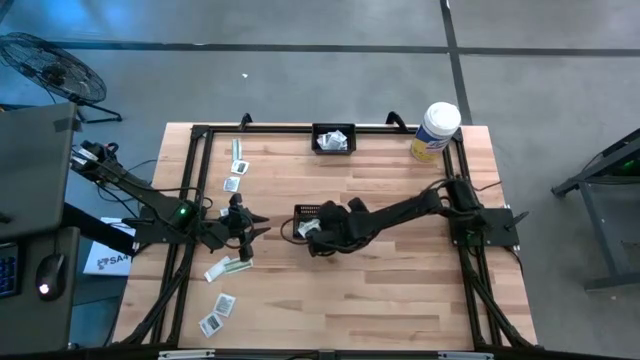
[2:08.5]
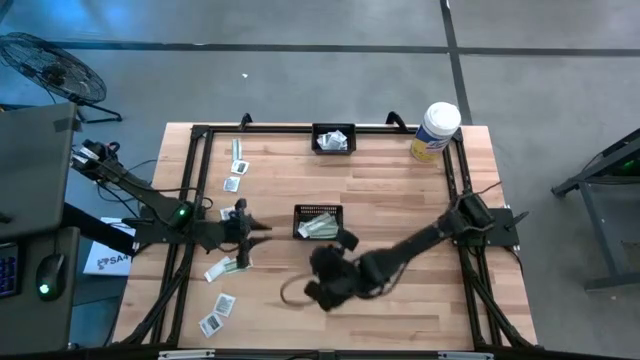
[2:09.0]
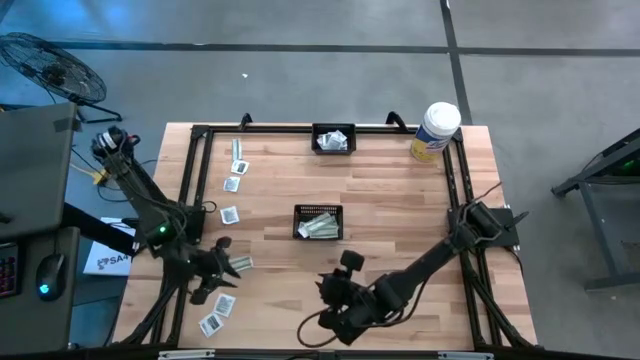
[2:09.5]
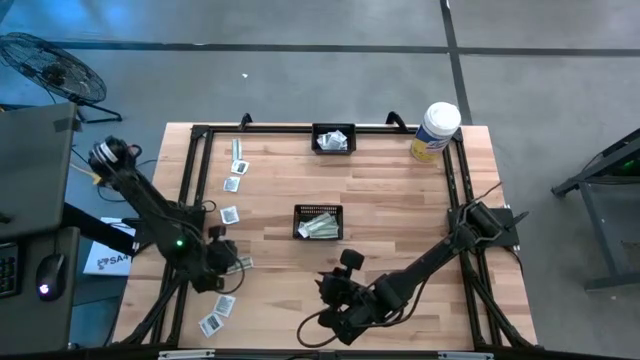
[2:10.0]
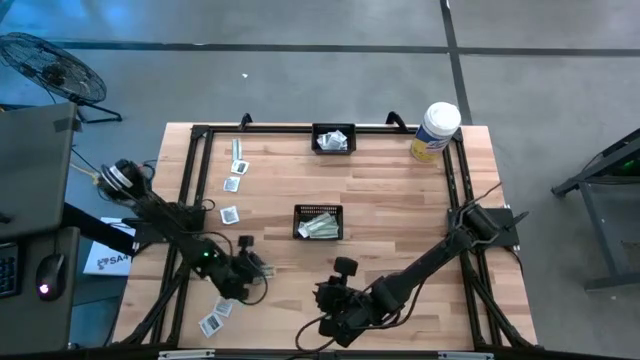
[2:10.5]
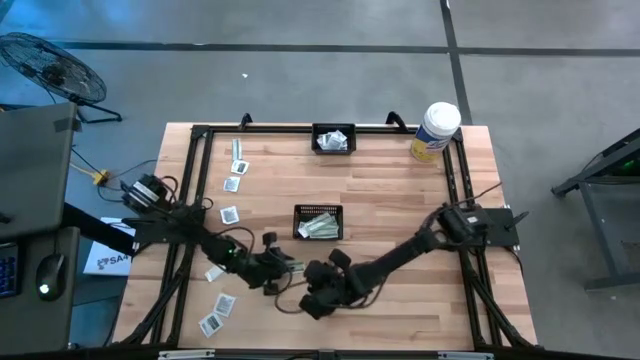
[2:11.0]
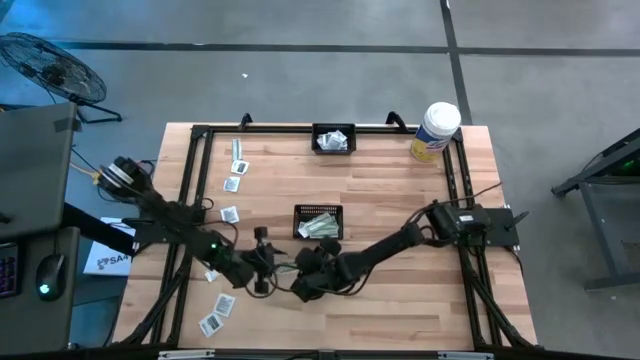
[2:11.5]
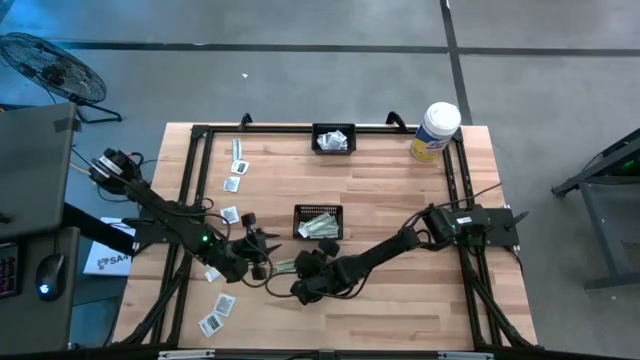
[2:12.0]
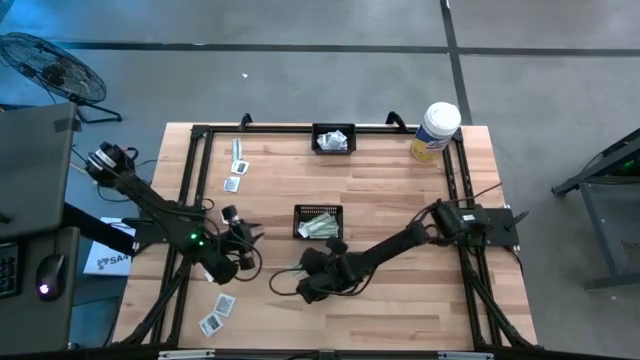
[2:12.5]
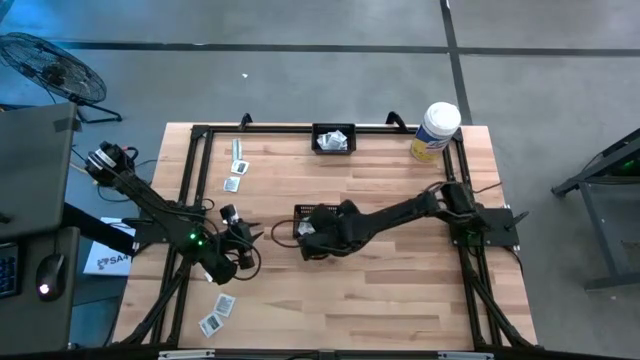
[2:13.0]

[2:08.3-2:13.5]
Task: Pick & Place First Aid Supplies
Put the bandage into the bottom black basket

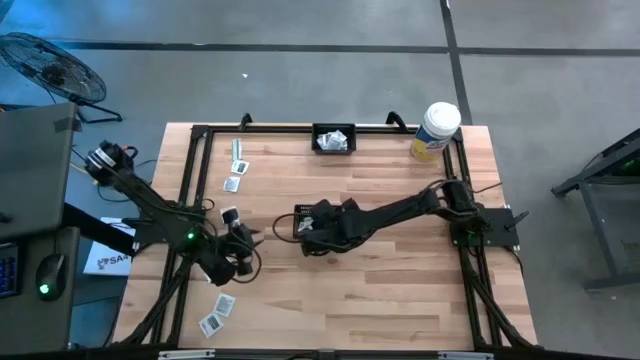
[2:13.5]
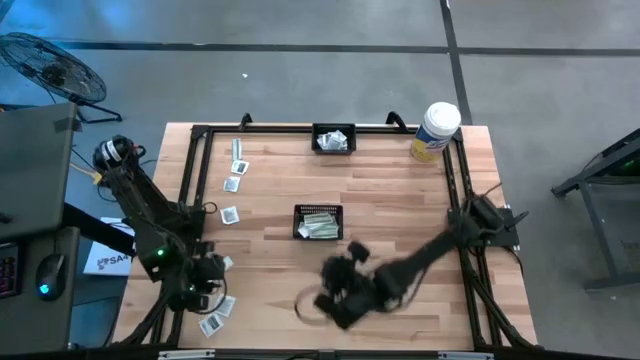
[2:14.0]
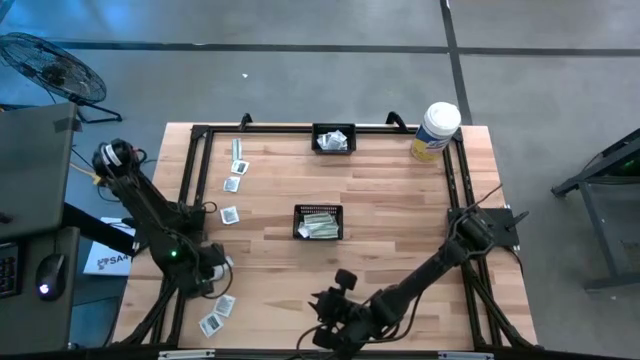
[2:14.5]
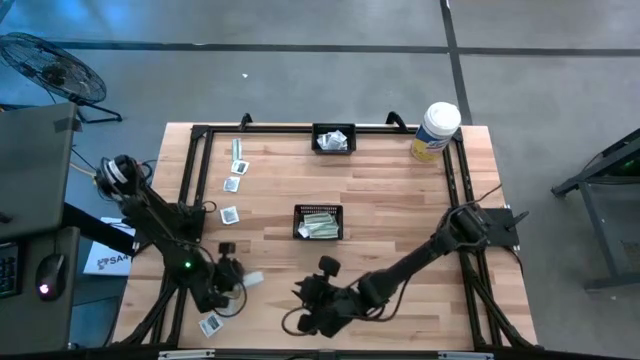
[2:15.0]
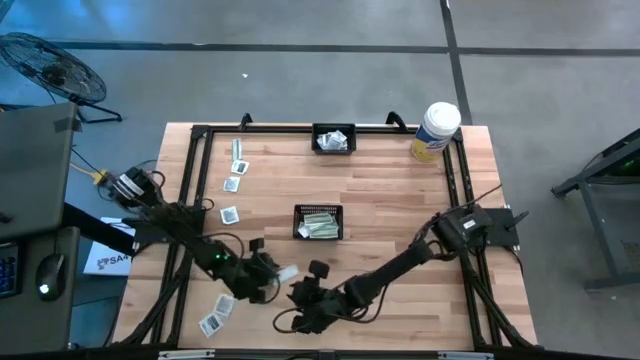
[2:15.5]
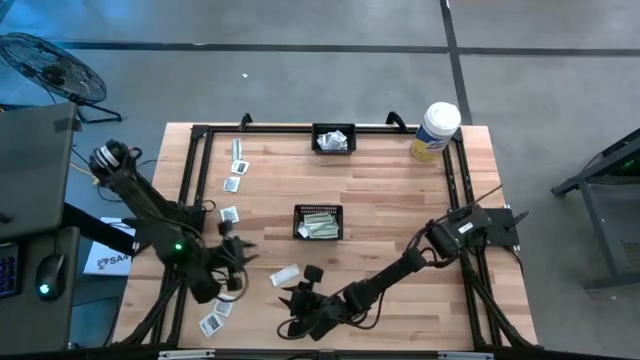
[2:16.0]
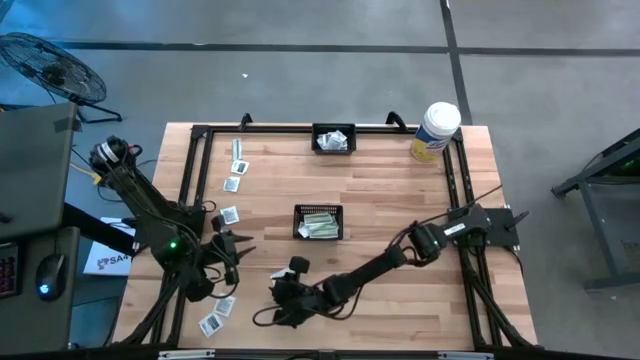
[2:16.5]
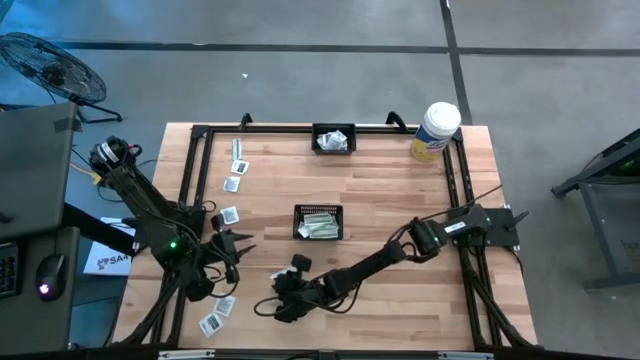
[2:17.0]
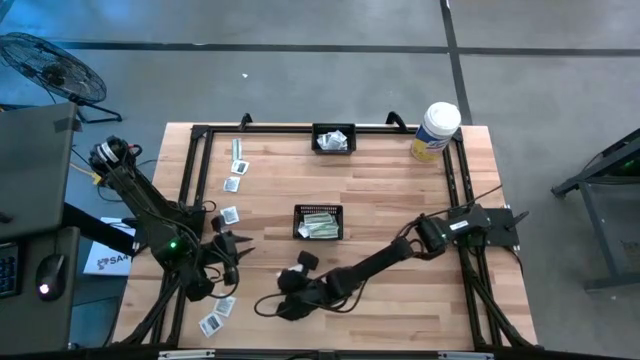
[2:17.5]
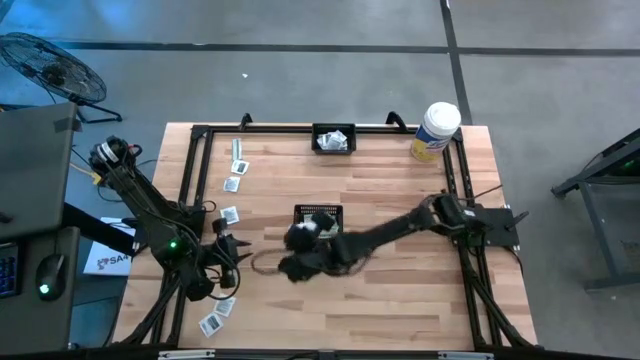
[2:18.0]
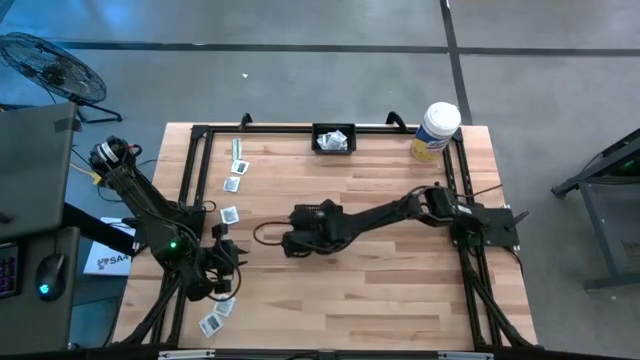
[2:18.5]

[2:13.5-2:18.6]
Put the bandage into the bottom black basket

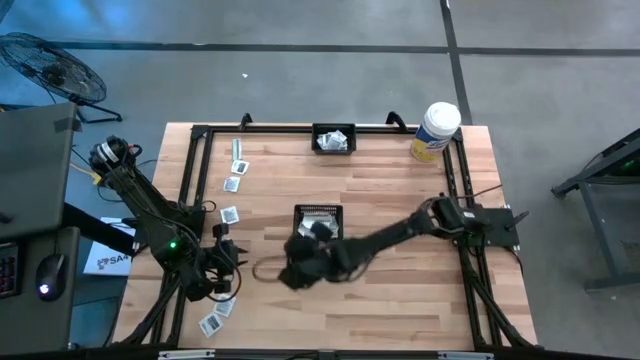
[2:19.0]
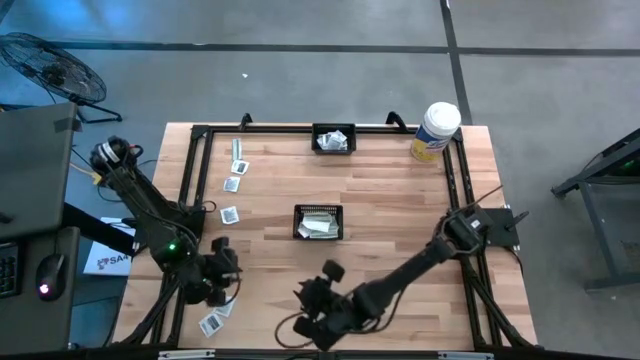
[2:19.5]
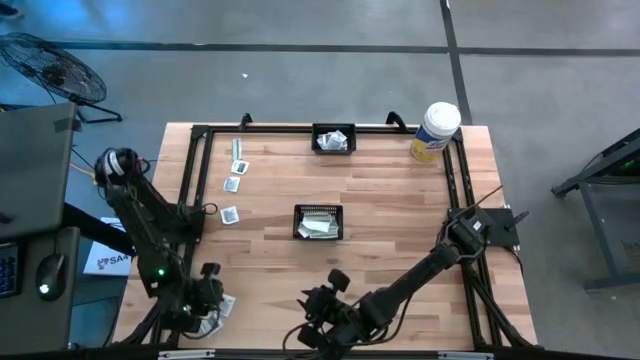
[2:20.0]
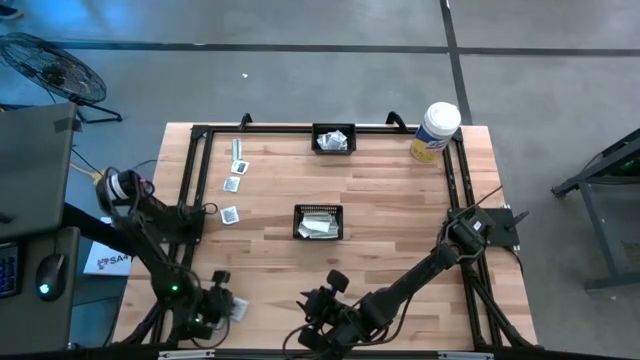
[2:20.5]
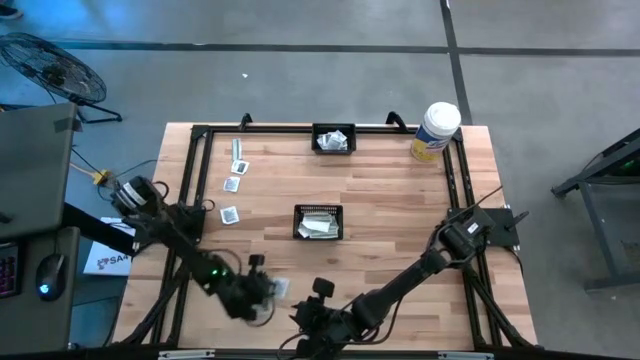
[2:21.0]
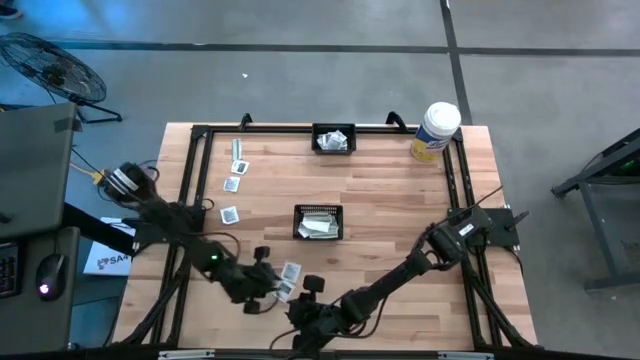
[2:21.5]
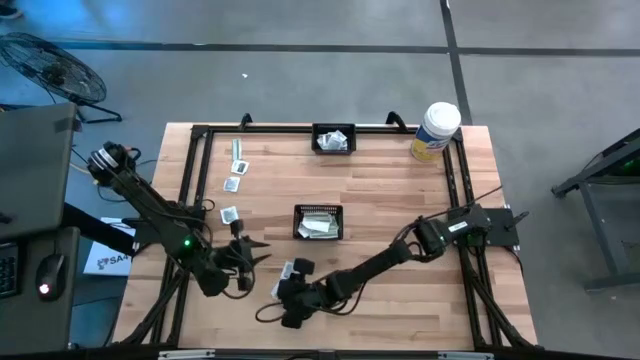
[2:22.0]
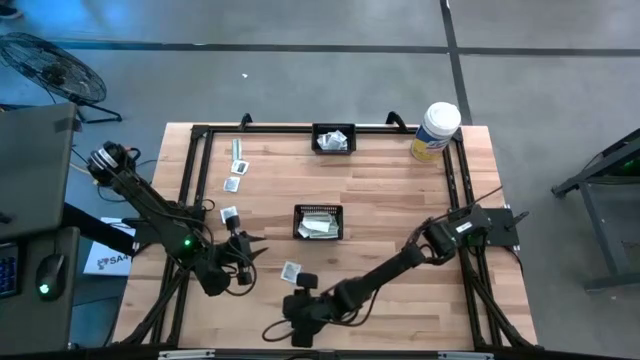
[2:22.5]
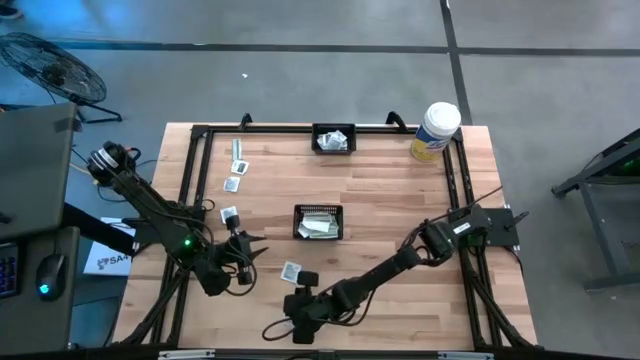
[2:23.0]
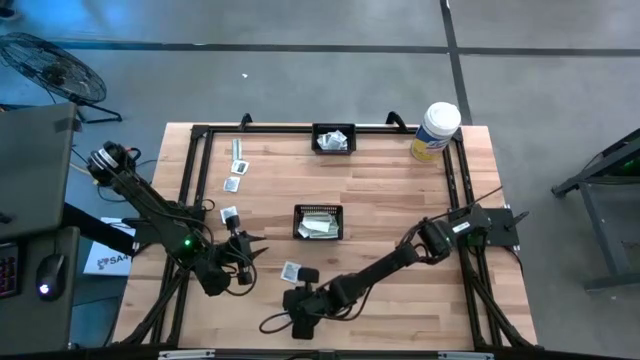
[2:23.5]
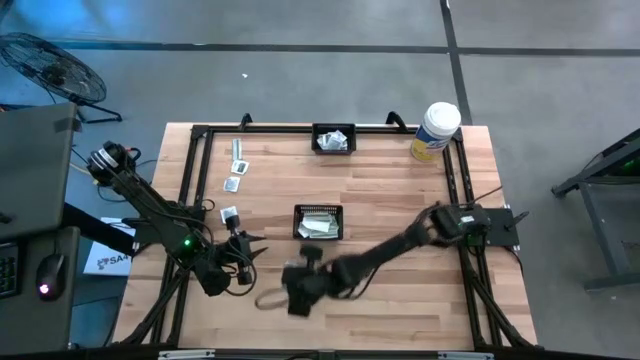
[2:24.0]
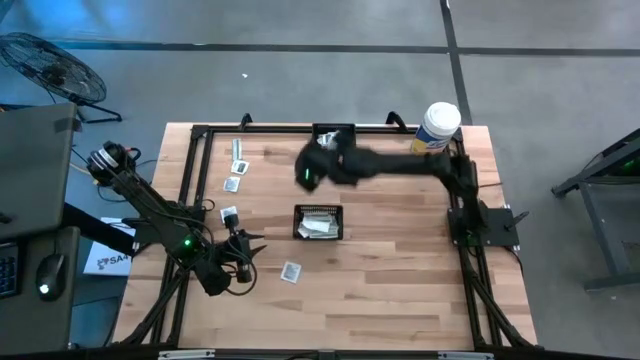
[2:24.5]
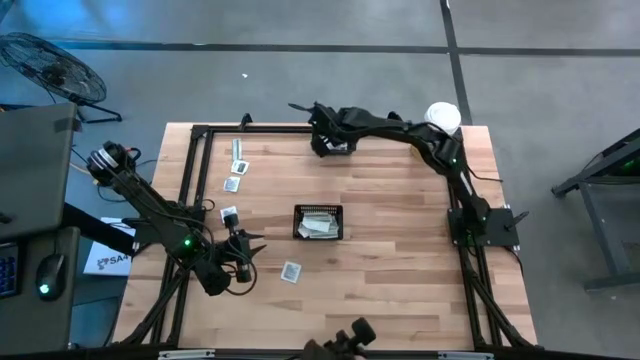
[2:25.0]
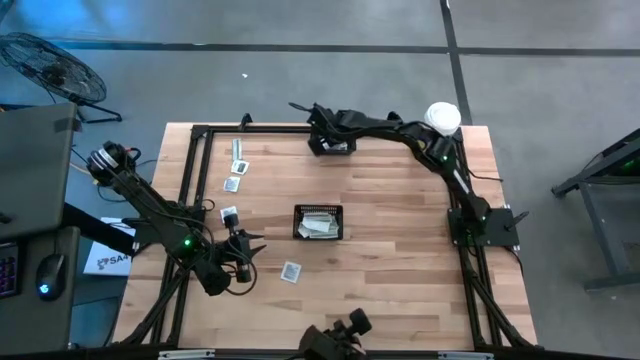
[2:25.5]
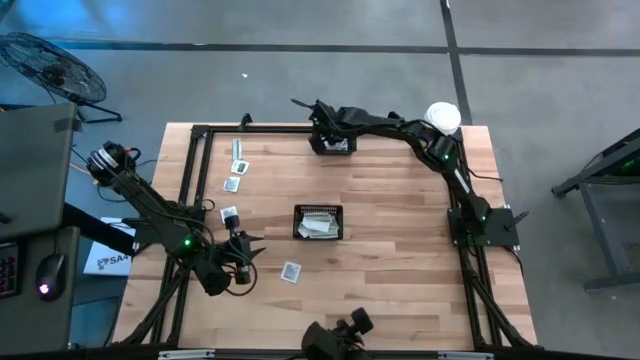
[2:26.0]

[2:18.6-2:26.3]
Put the towelette pack into the top black basket

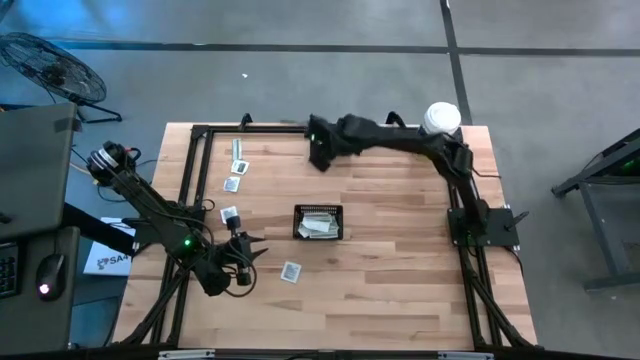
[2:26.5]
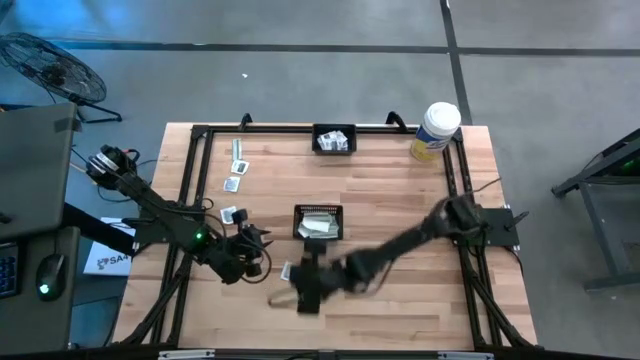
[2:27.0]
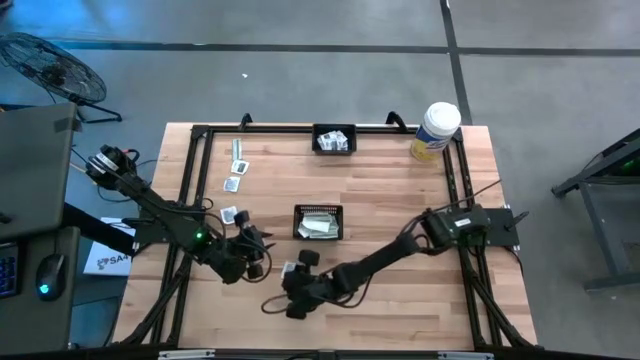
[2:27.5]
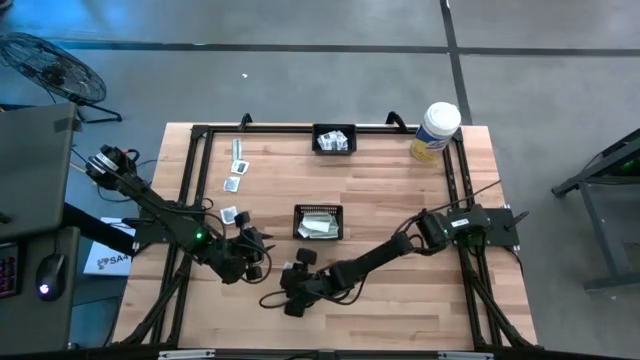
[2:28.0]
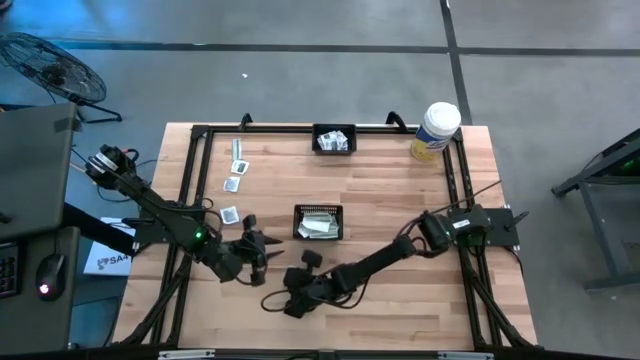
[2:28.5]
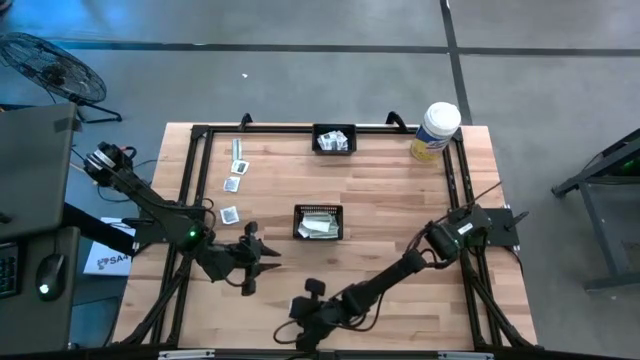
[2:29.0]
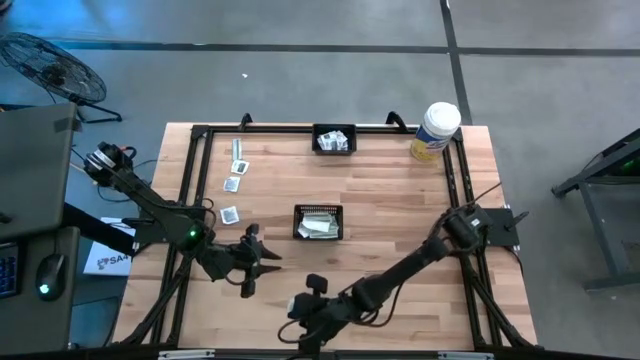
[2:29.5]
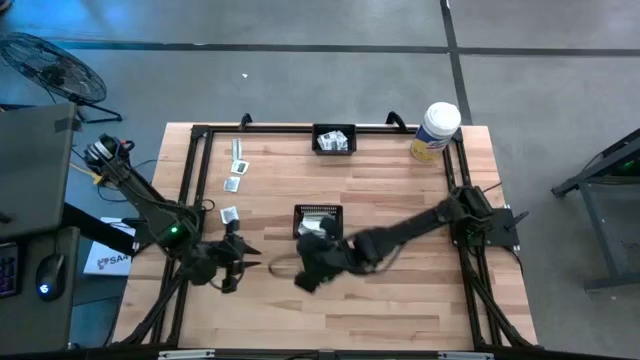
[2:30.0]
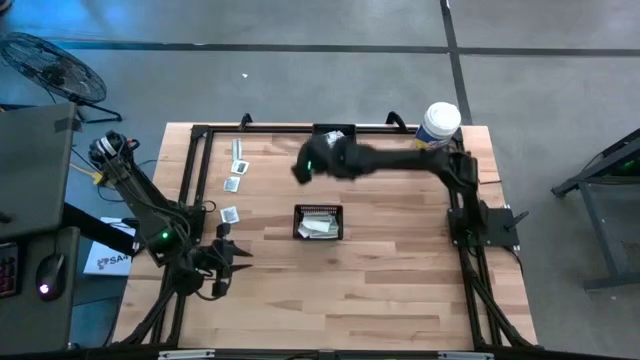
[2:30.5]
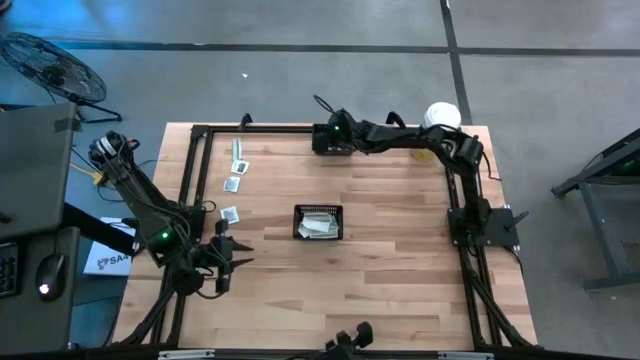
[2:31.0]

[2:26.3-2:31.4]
Put the towelette pack into the top black basket
